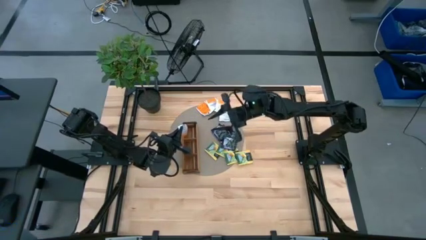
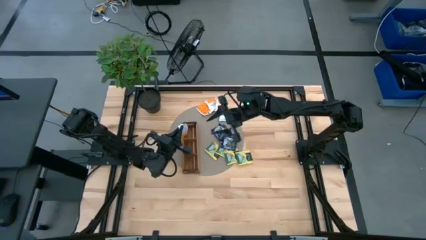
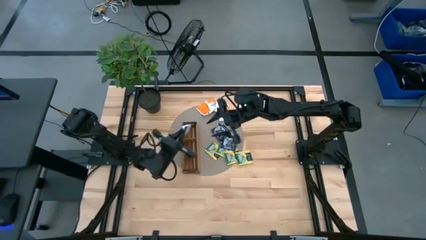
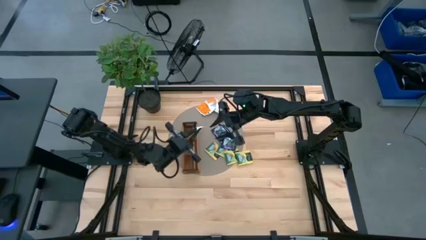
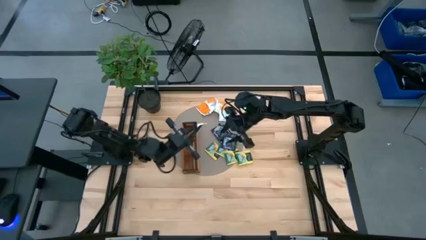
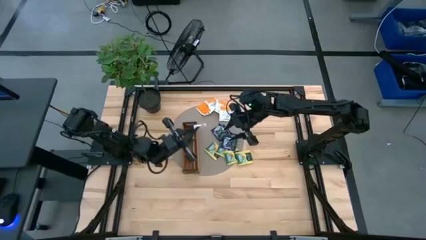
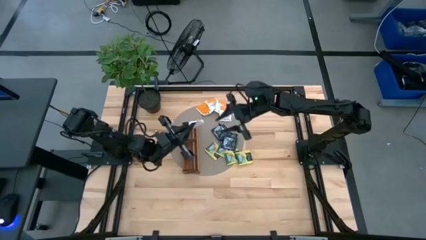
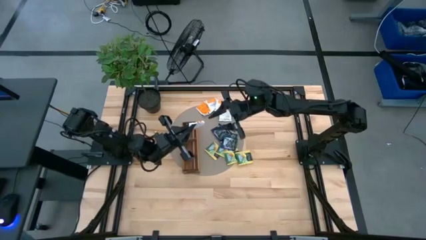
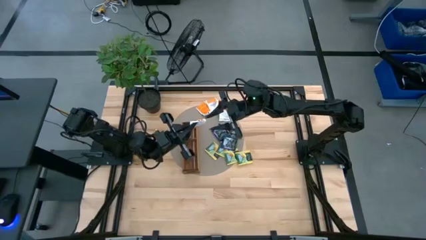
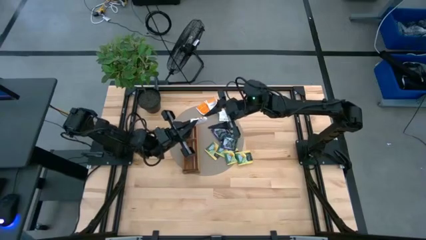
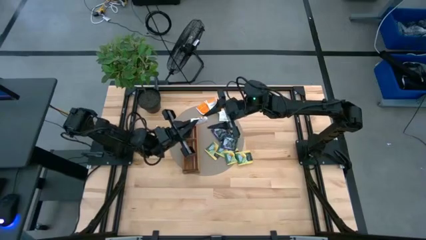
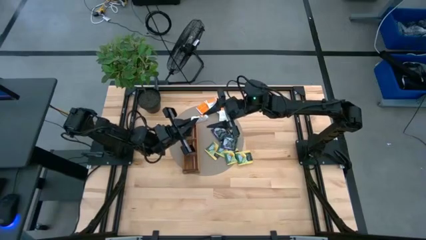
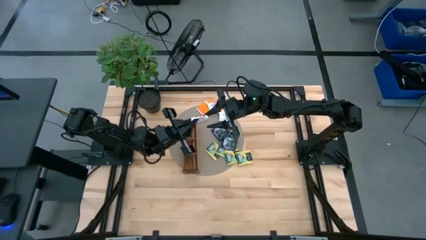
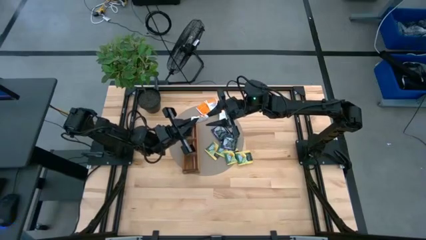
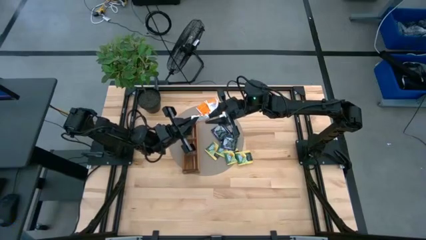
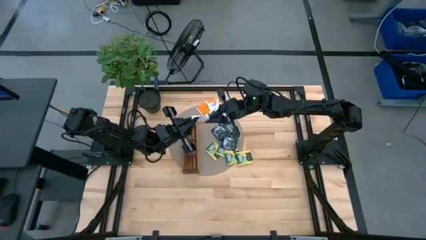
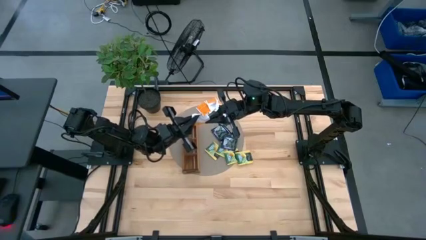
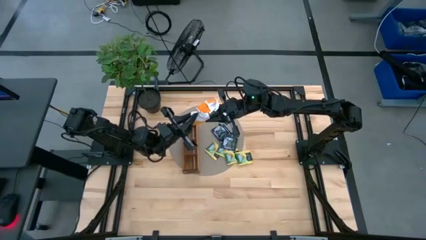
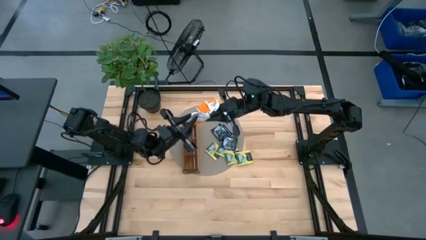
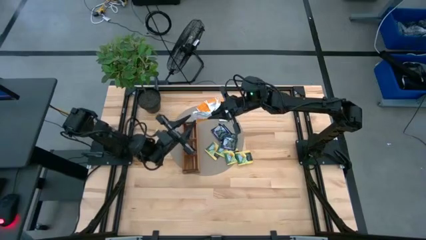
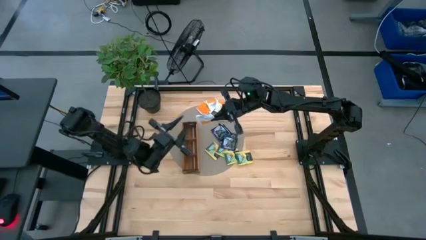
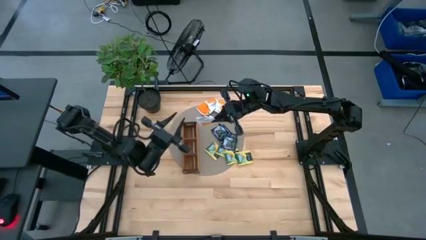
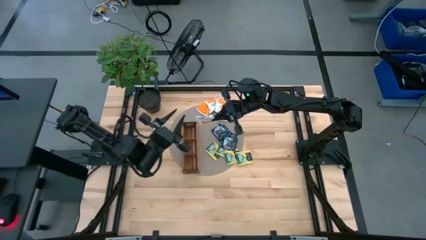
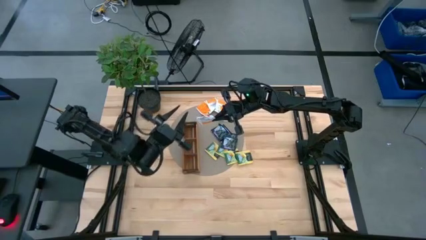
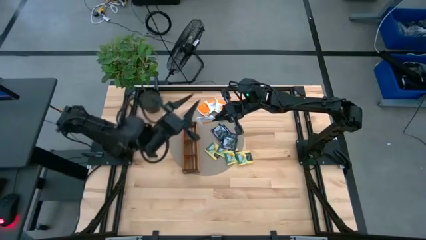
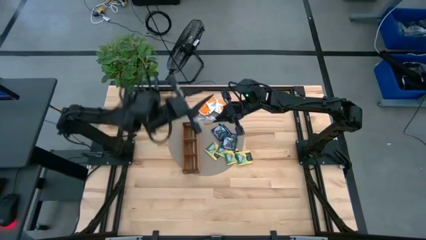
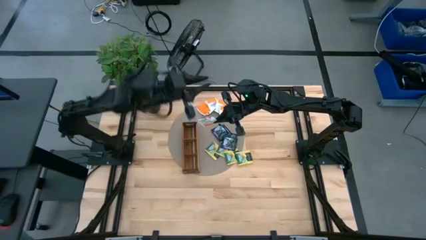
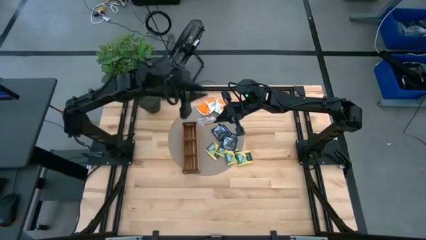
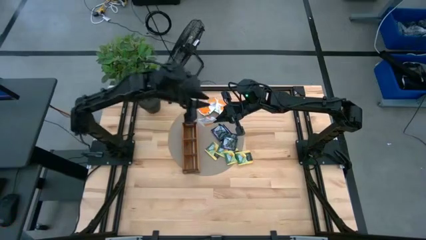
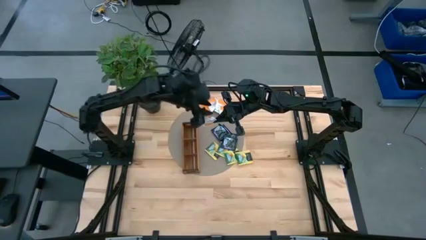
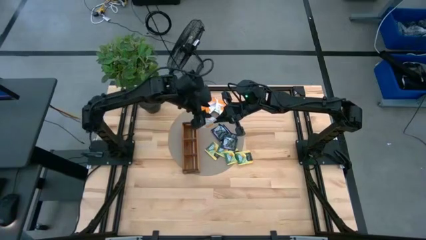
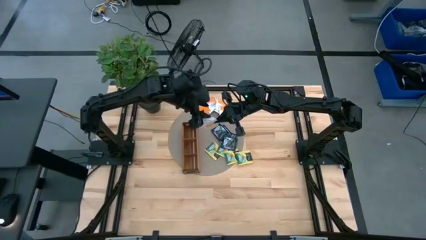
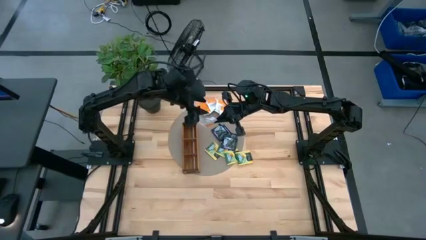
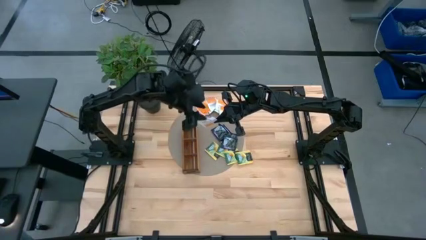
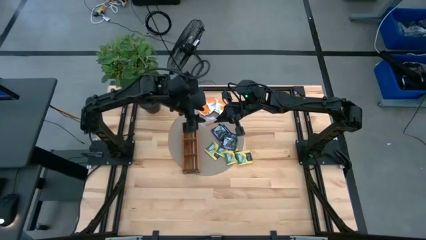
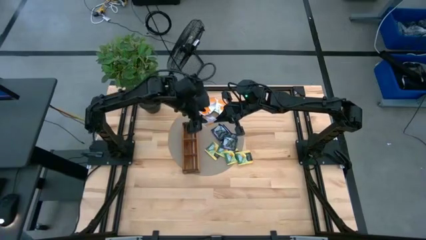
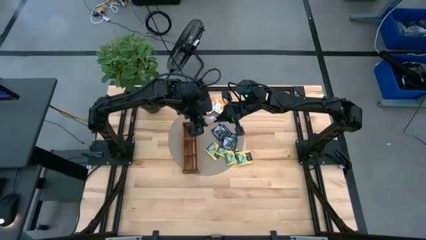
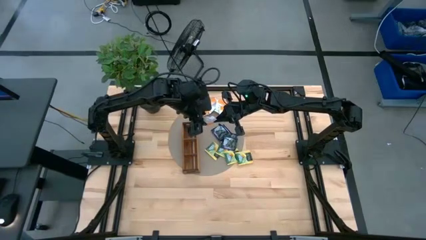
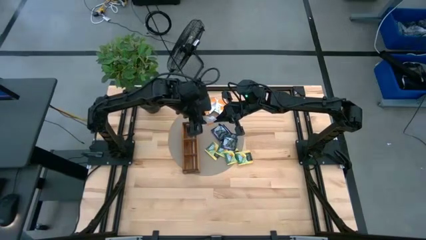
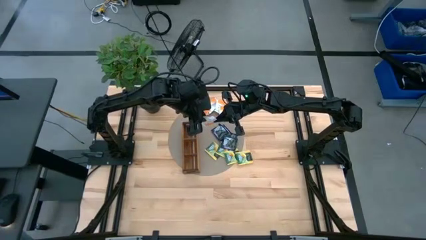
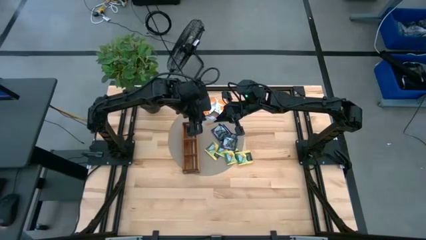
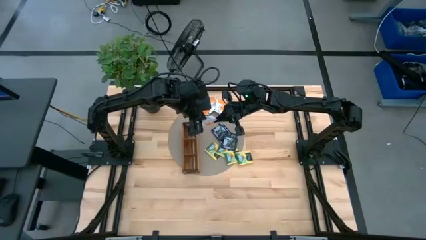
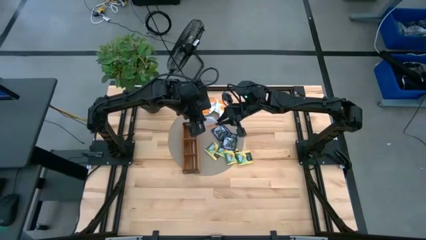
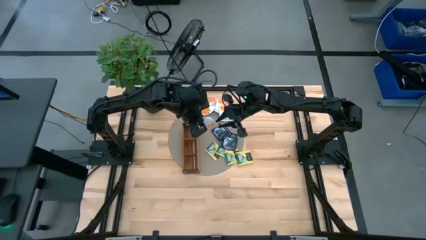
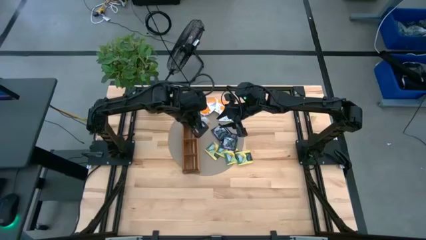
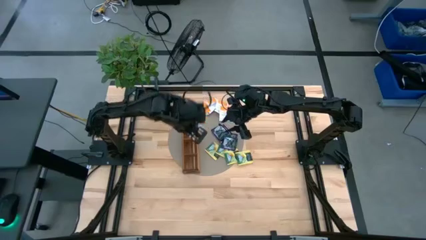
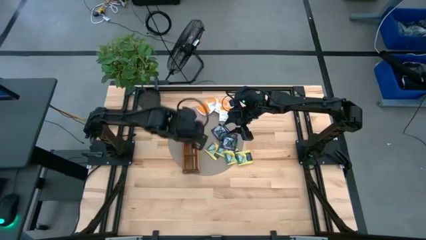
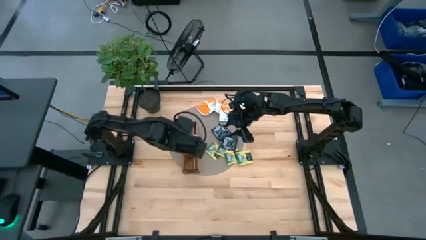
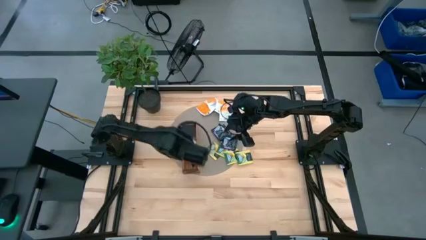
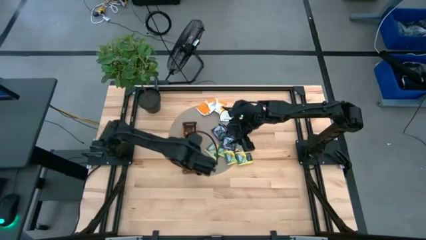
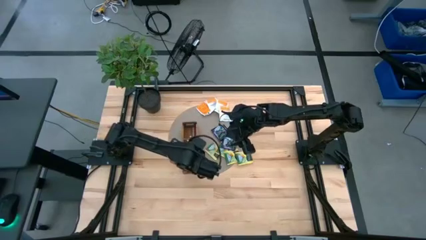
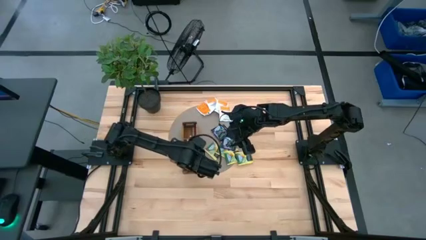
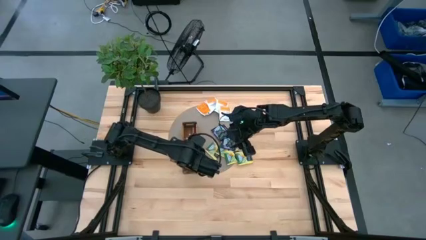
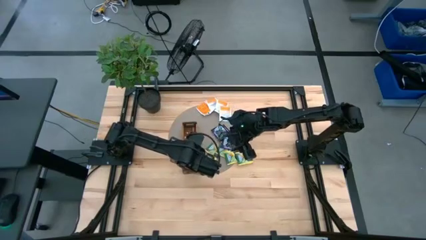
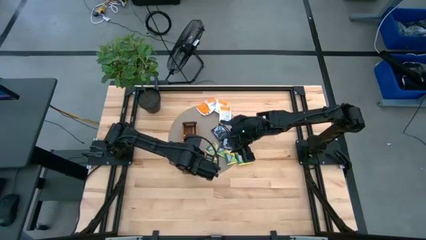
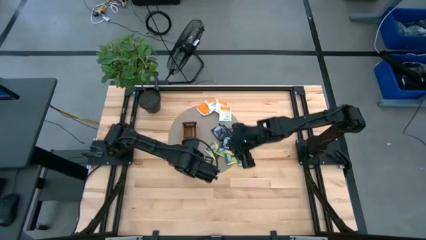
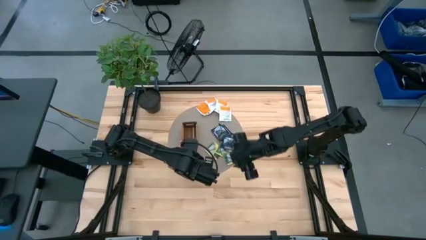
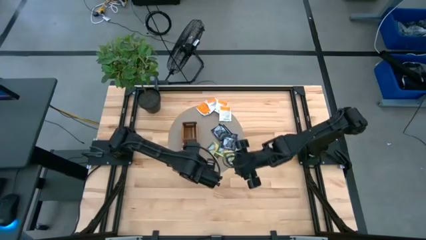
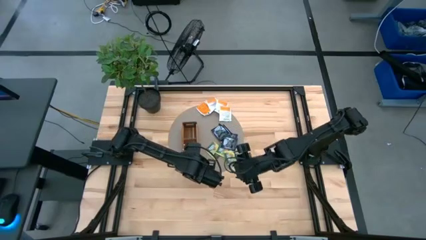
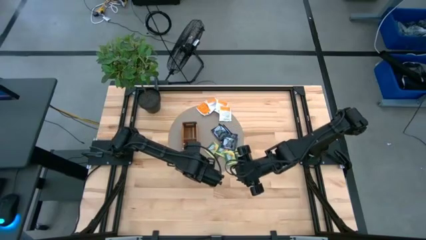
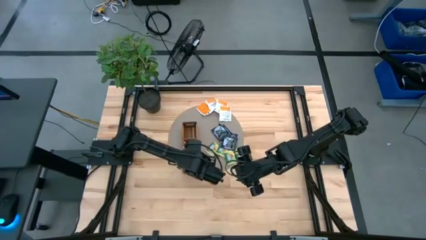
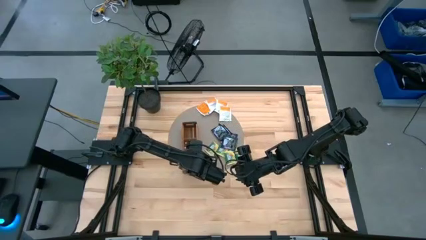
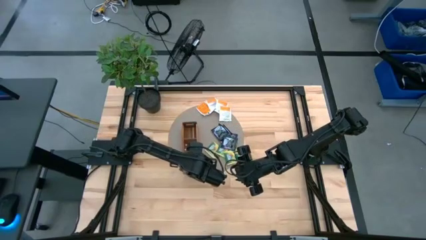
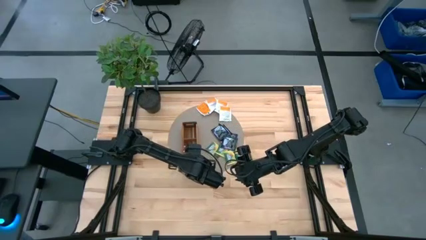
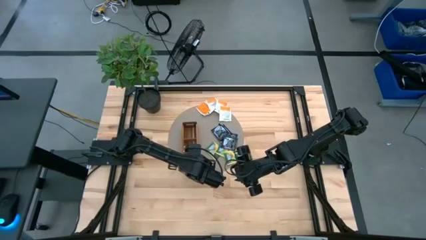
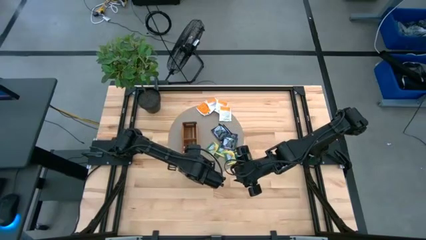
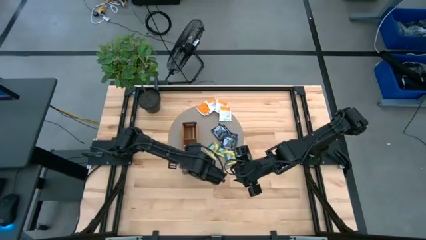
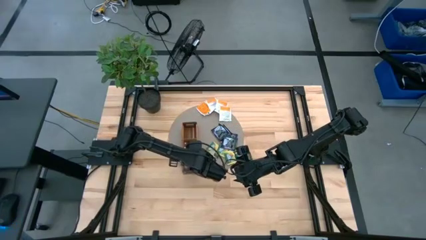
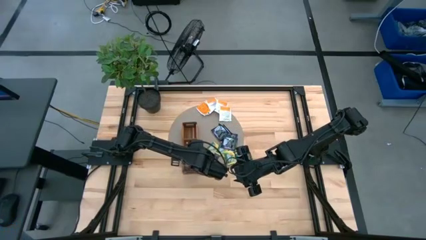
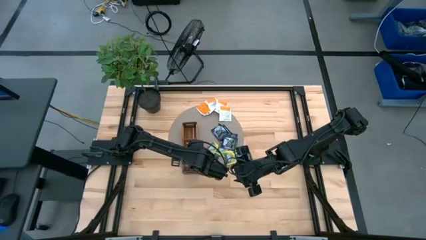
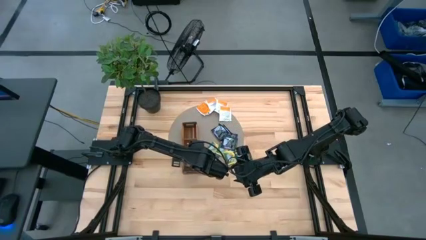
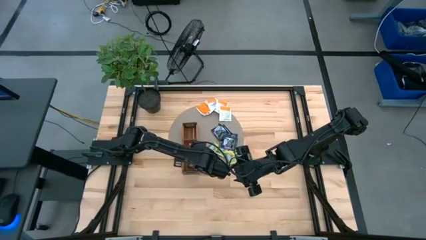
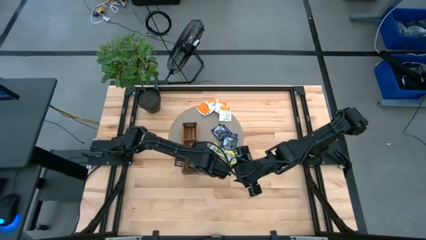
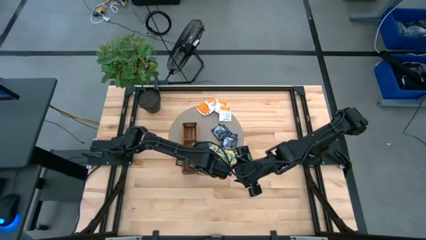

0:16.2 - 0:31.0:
Task: Pick & Place Tea
Put the white tea bag into the bottom section of the wooden organizer
